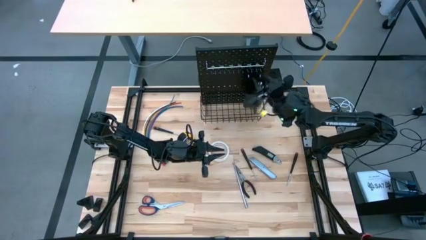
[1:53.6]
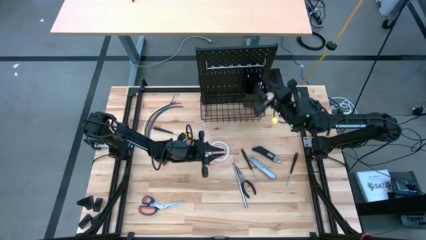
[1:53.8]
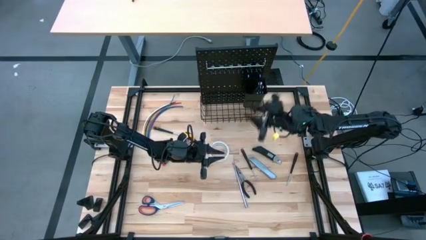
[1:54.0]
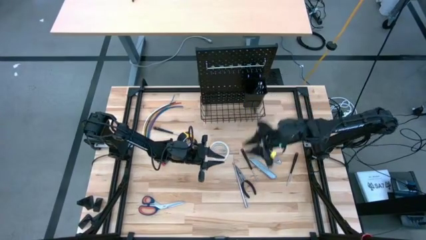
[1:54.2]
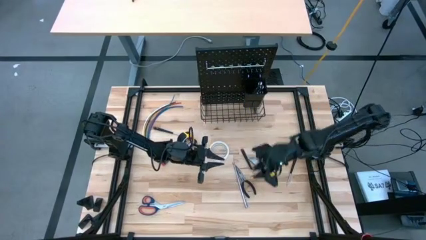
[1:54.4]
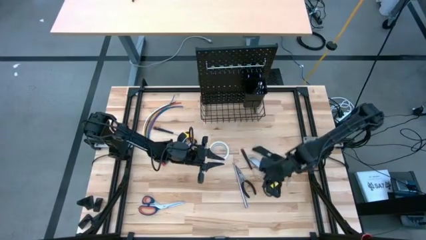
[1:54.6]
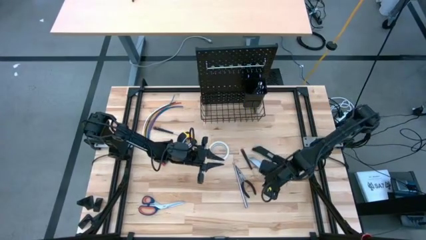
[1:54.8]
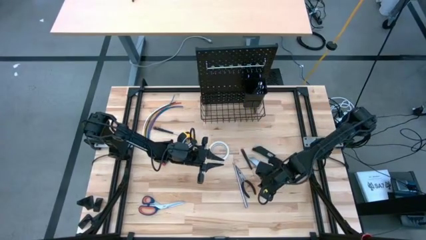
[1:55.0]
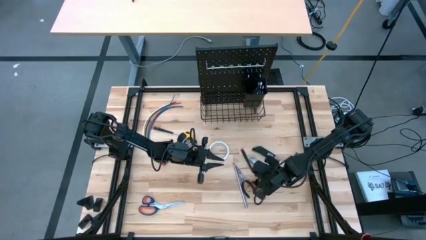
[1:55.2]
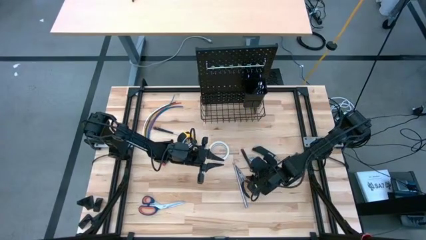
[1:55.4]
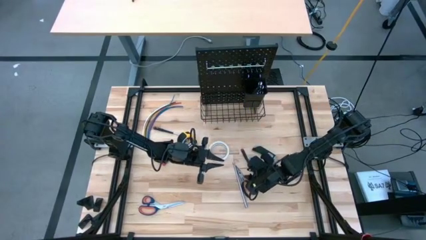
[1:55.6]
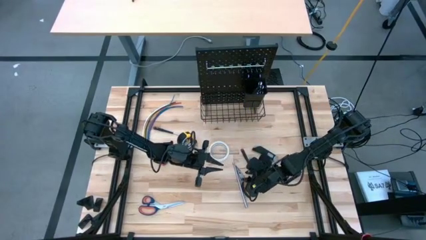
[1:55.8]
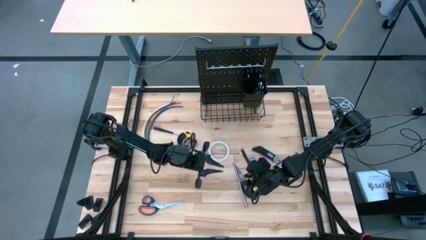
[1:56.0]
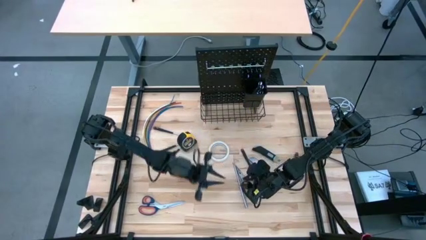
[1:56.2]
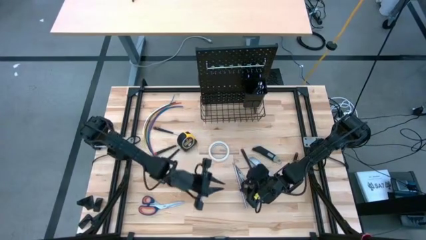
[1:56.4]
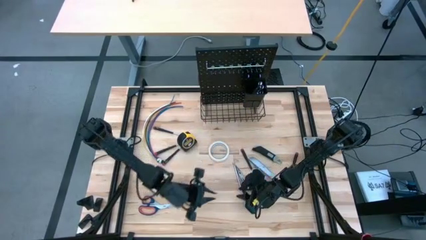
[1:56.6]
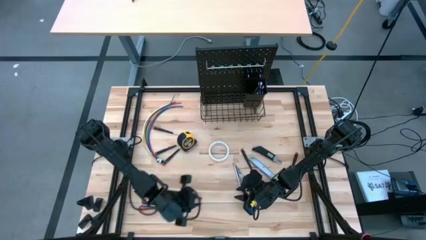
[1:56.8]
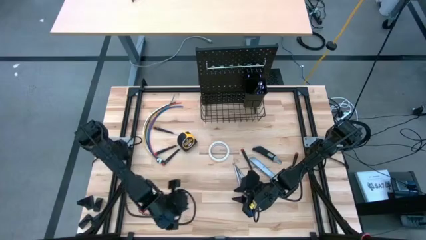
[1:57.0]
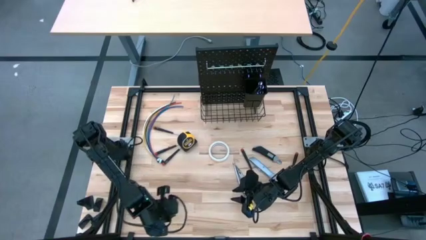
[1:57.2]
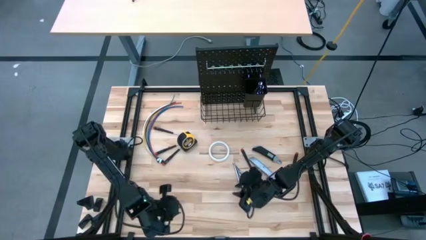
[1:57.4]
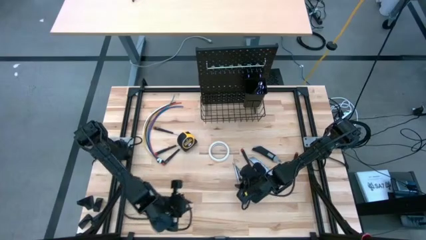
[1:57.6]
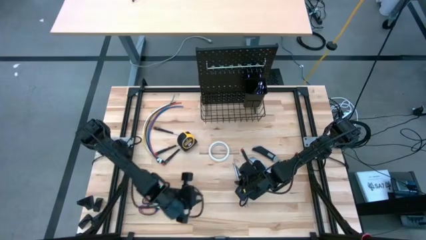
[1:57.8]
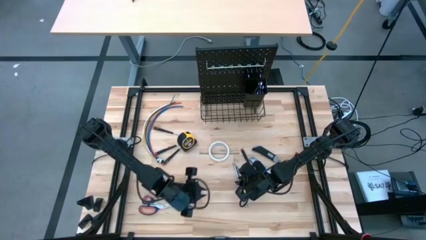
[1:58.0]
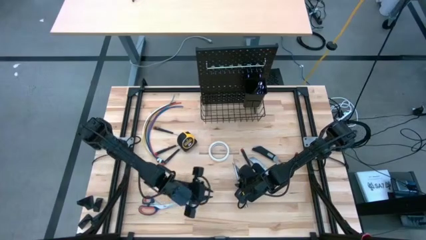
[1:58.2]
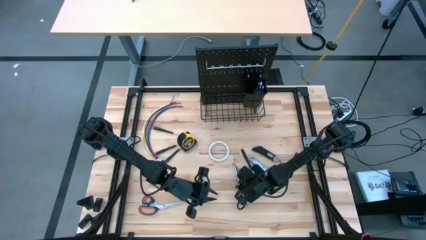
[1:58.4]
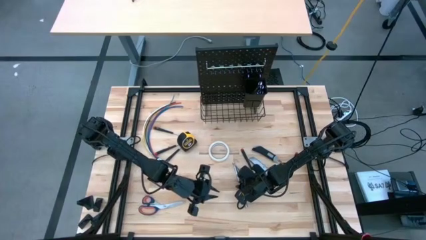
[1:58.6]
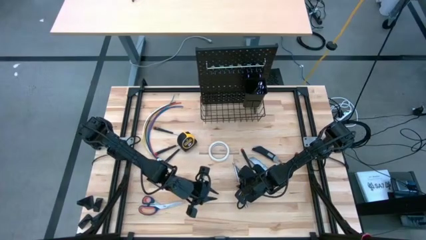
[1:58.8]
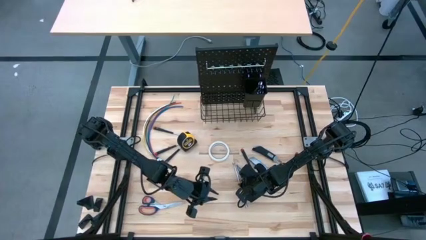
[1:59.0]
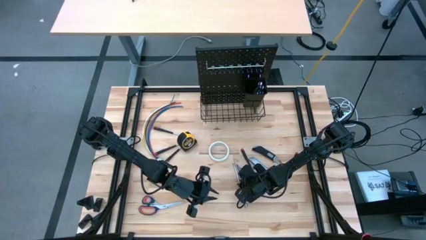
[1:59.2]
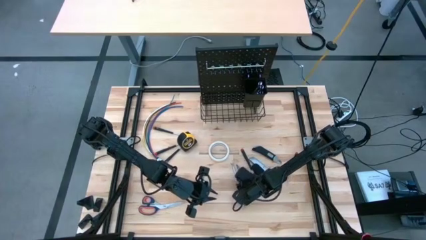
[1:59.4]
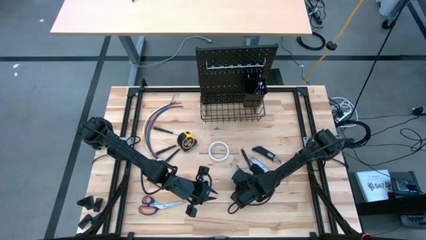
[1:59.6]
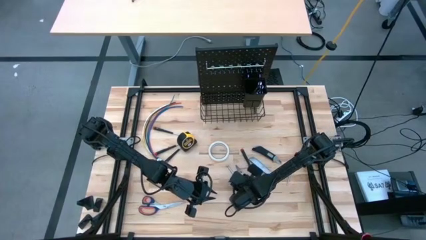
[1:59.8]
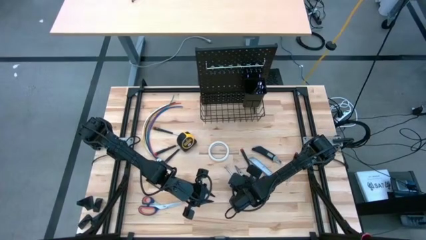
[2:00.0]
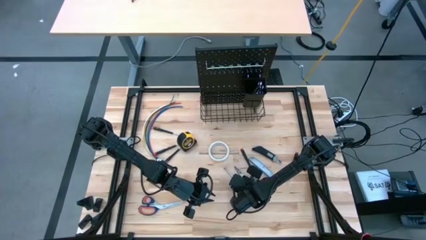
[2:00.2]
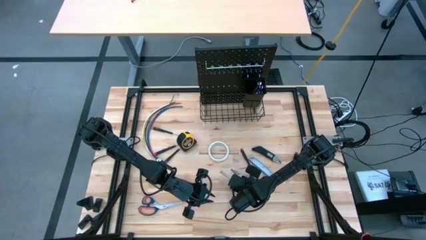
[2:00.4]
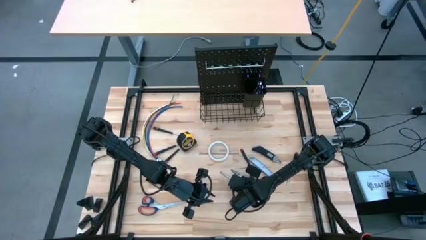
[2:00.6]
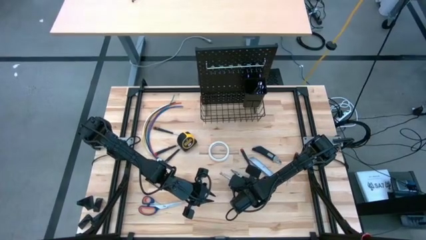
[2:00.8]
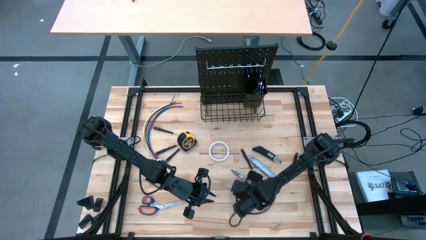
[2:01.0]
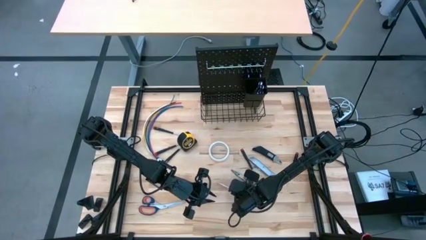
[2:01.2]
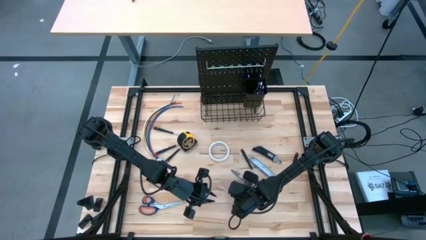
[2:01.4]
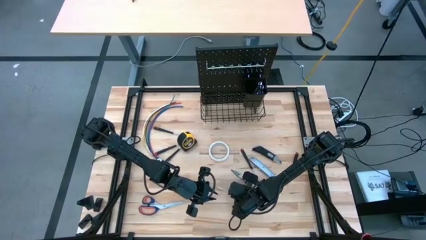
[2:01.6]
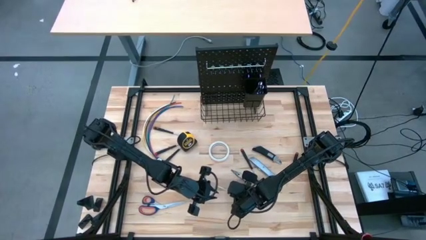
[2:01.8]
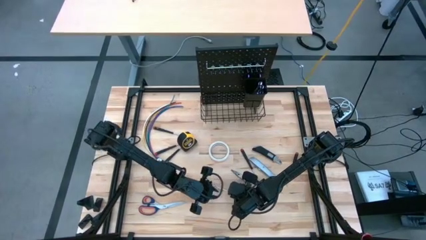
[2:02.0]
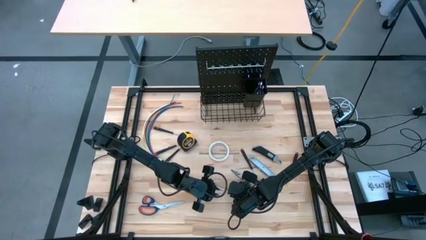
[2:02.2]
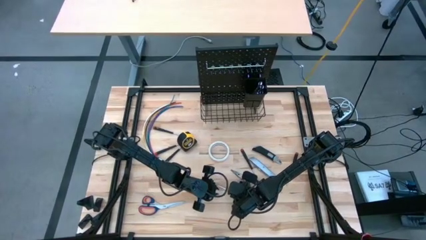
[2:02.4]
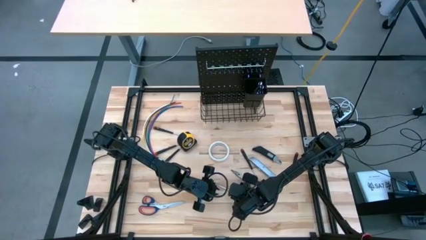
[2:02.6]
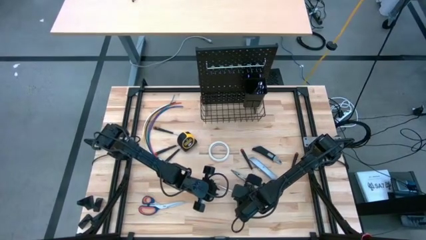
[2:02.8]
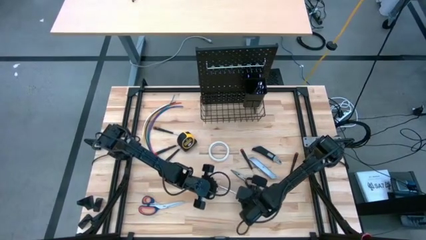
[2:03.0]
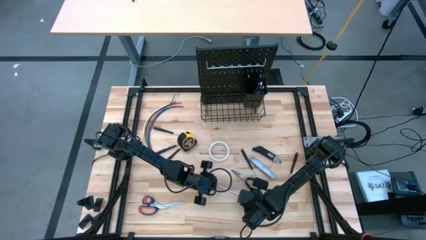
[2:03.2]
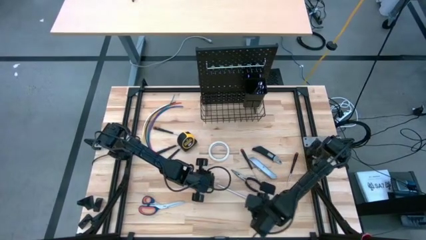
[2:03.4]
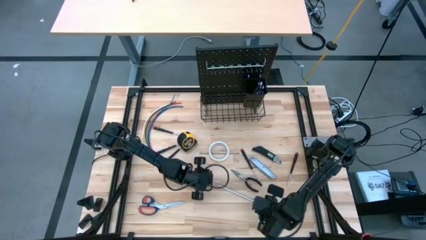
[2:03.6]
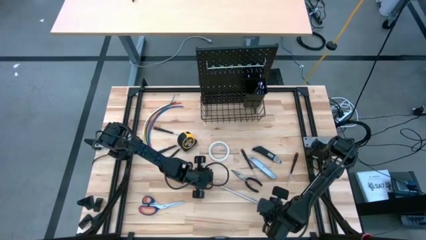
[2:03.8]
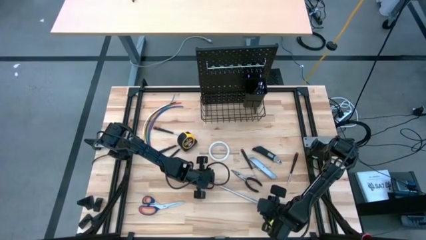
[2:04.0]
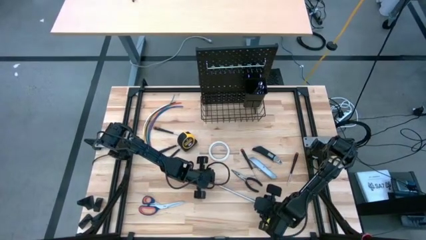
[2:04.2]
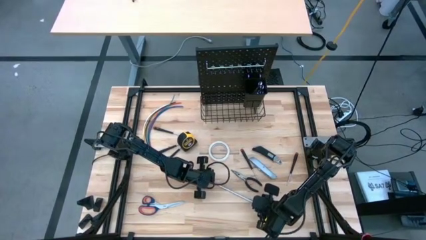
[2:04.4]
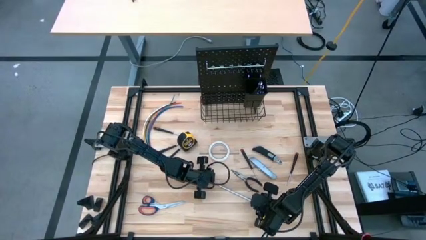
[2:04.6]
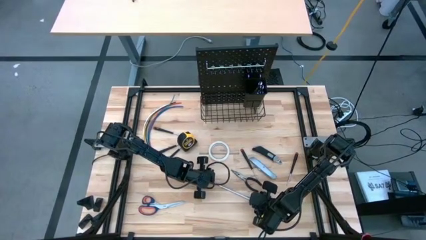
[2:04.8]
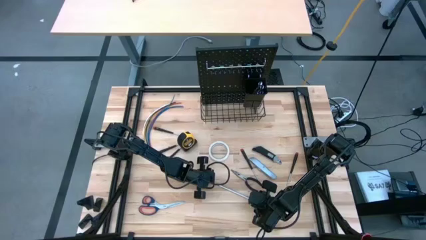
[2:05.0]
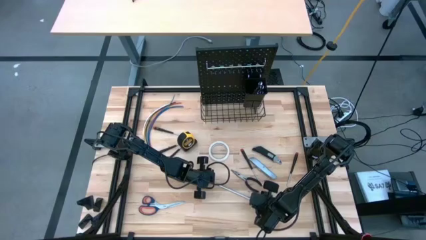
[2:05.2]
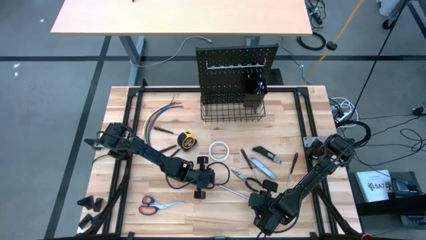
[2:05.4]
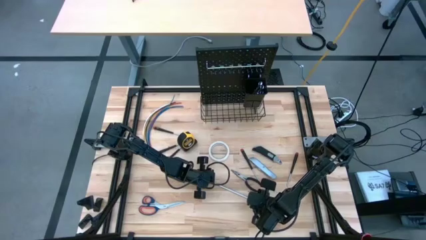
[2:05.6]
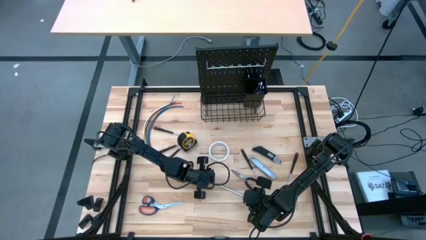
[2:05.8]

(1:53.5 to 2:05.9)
Task: Hang tools onto peg board
Put the tire pressure gauge pen into the black bin on the peg board
